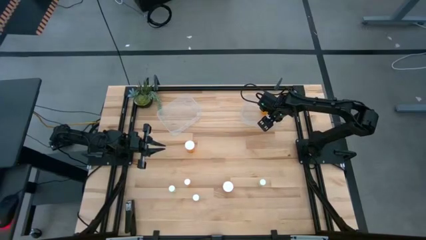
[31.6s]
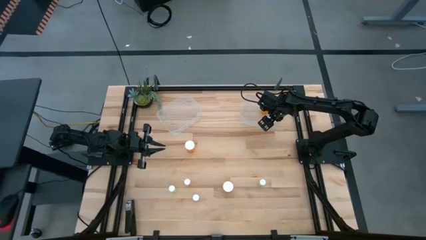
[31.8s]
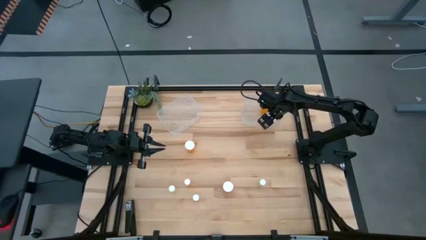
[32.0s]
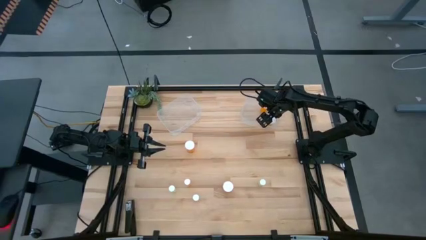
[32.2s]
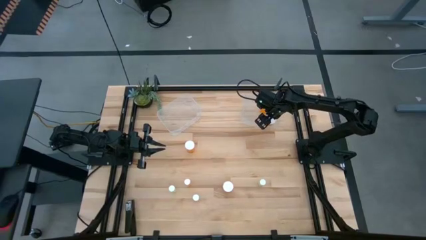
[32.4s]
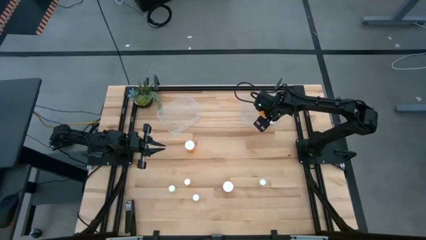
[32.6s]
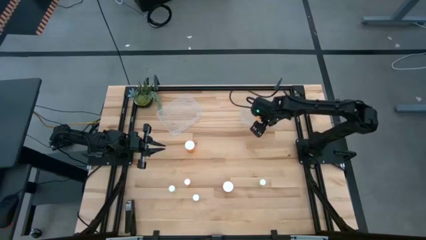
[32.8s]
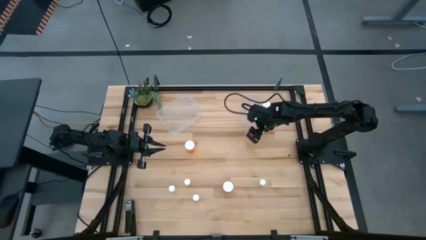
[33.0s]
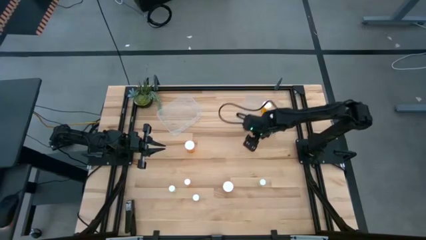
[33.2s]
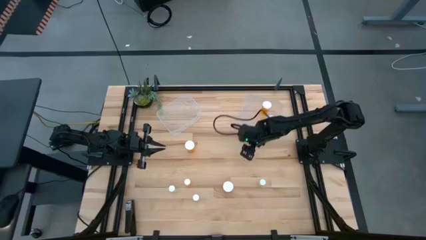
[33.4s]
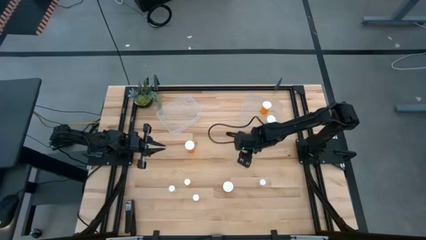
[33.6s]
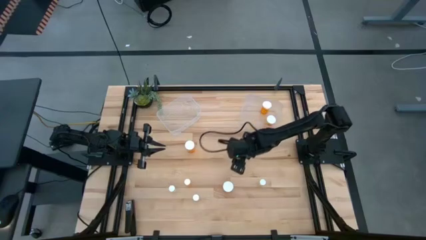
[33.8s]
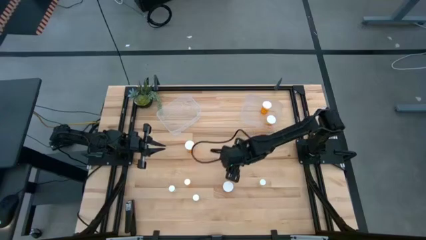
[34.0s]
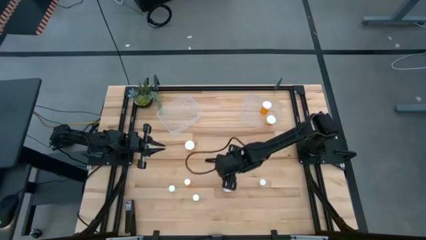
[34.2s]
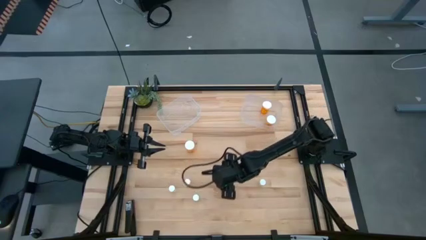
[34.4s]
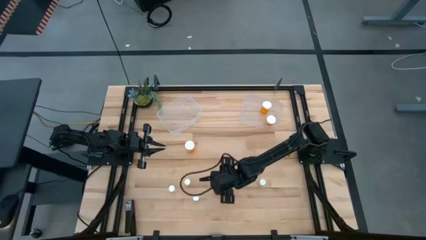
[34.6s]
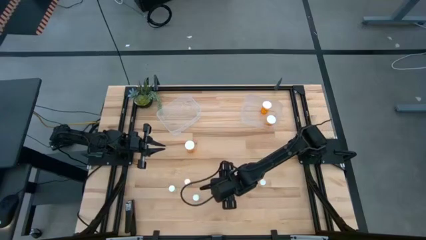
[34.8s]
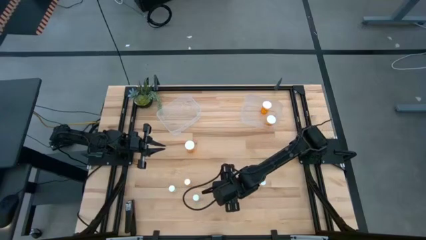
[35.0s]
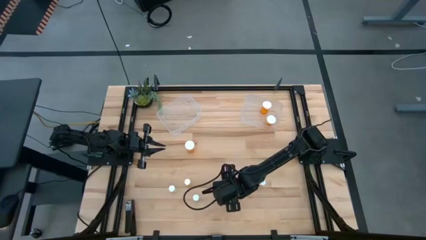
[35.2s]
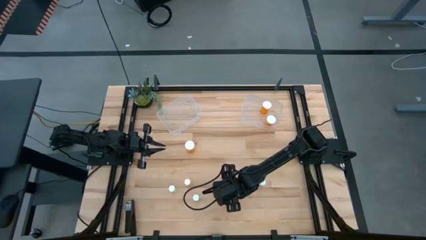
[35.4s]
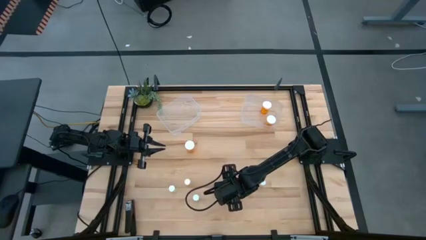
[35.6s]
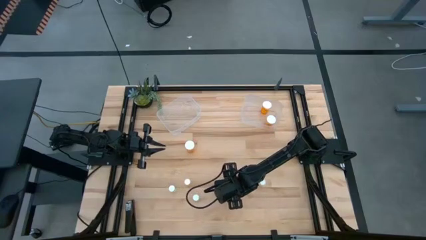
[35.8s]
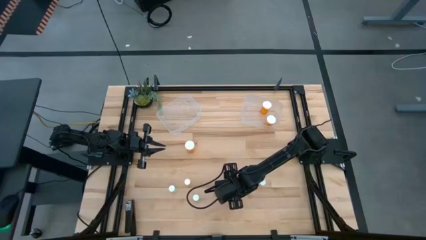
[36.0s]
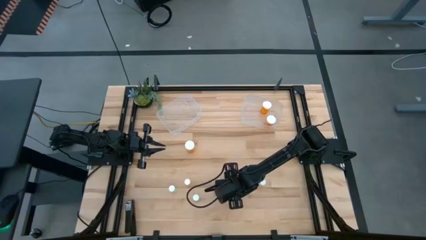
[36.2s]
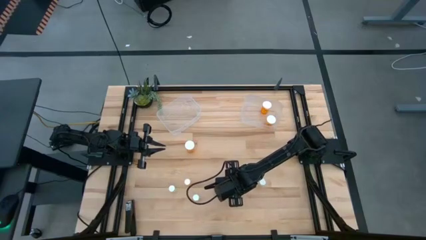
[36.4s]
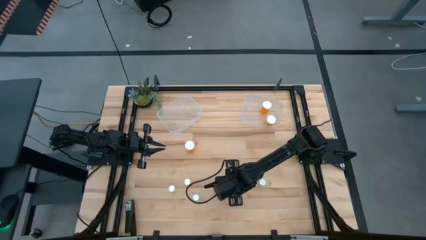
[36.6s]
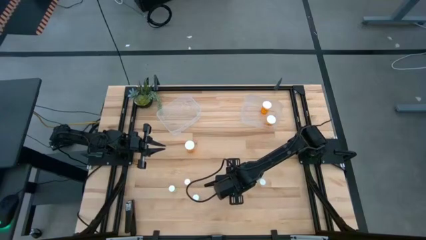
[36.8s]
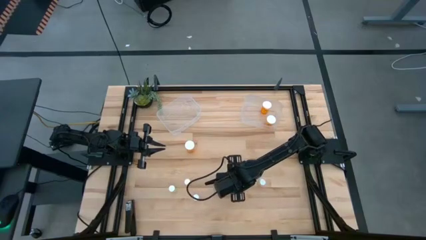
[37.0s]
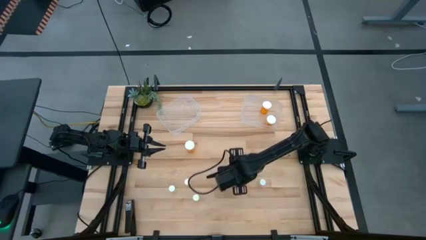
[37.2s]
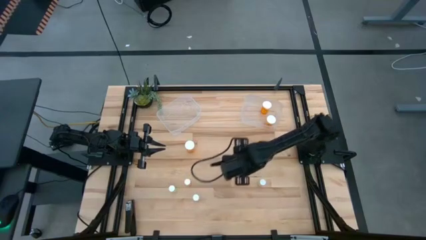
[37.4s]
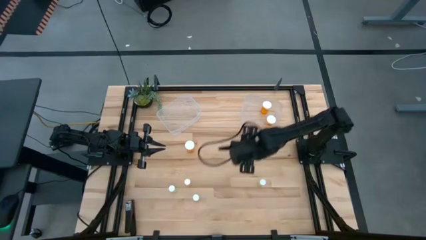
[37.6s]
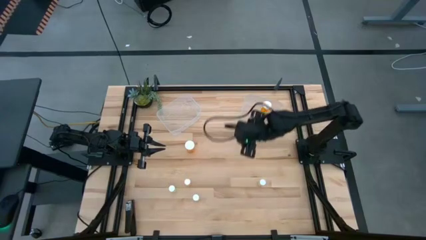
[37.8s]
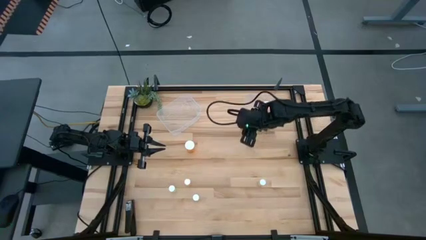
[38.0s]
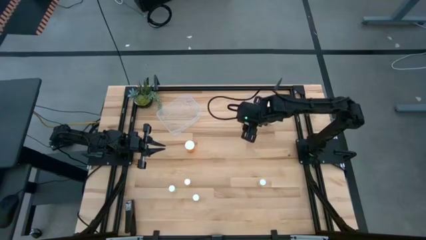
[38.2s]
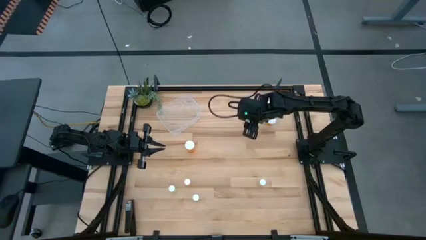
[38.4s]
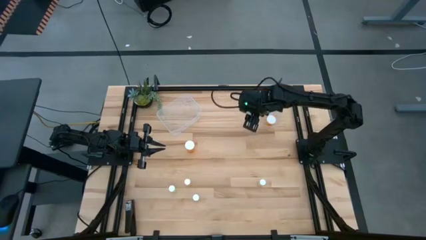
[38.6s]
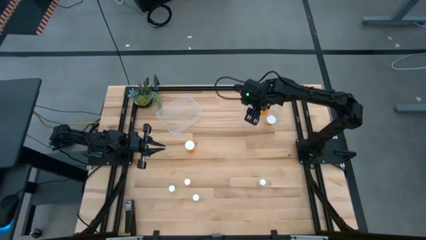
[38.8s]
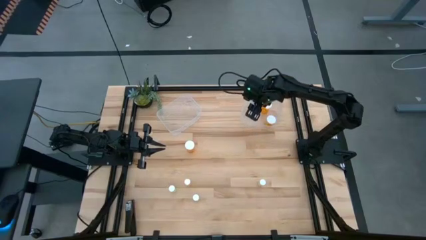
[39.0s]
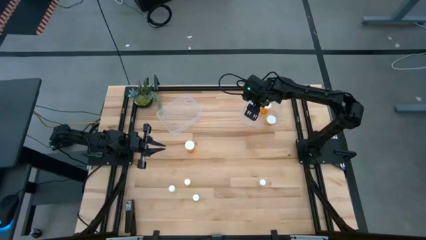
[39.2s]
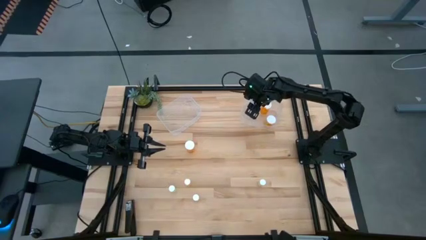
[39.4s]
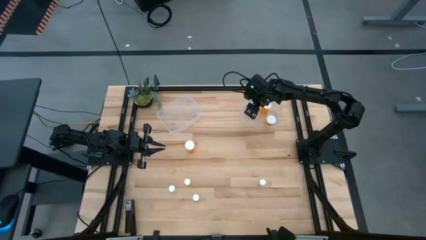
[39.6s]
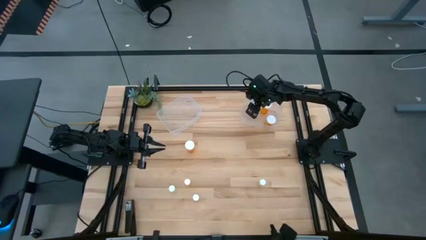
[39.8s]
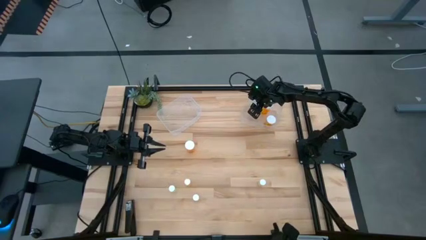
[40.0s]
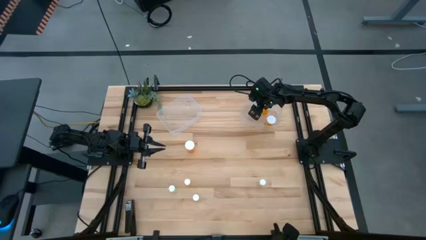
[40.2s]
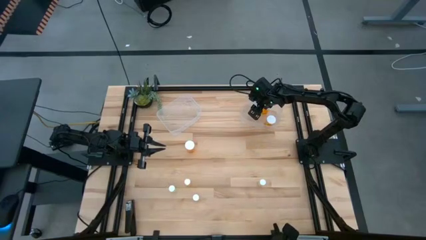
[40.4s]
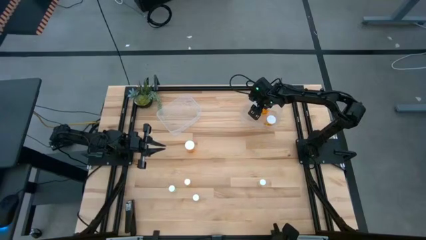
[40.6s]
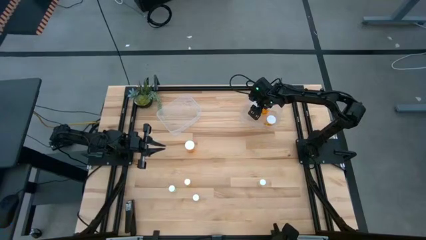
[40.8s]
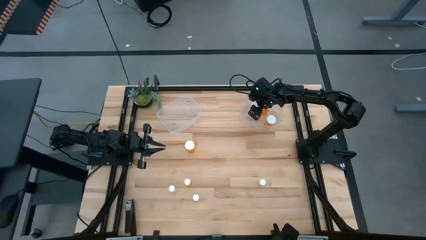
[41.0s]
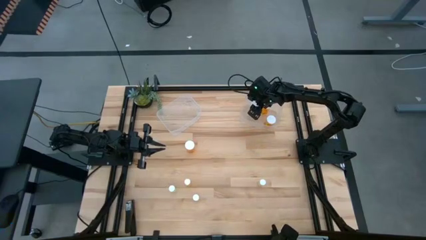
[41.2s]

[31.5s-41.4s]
Task: Pick and place medicine bottles into bin by pill shape (circle, oval)
Put the big orange pill bottle into the right transparent bin

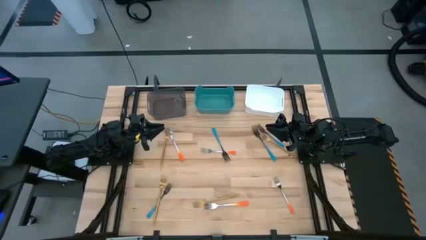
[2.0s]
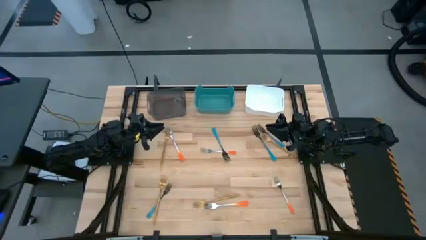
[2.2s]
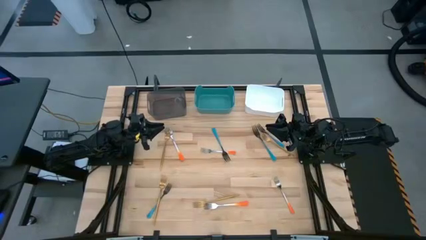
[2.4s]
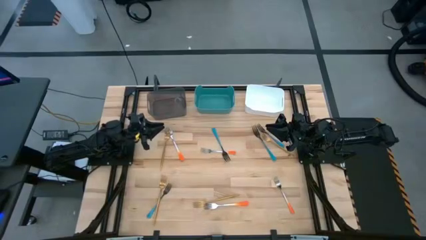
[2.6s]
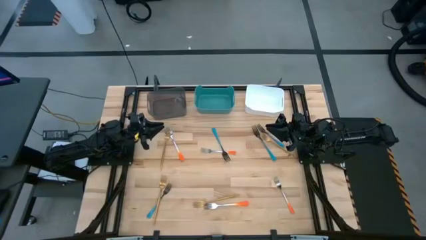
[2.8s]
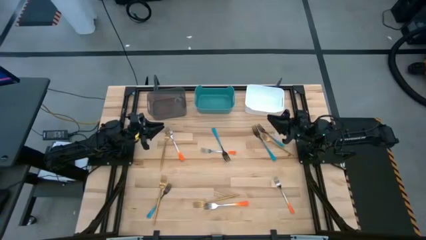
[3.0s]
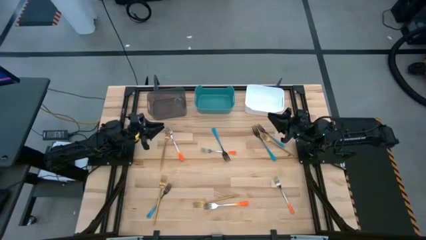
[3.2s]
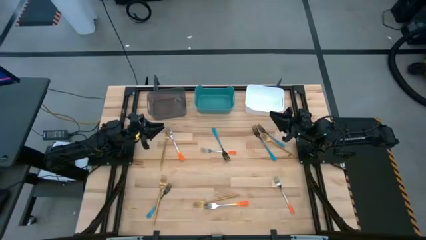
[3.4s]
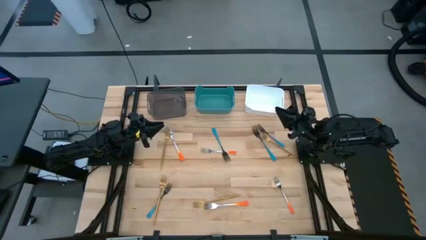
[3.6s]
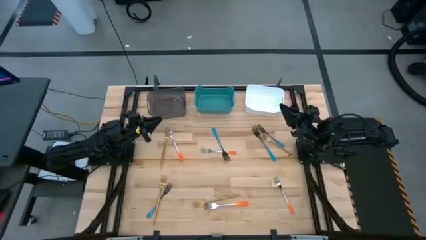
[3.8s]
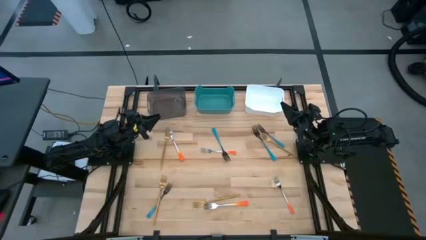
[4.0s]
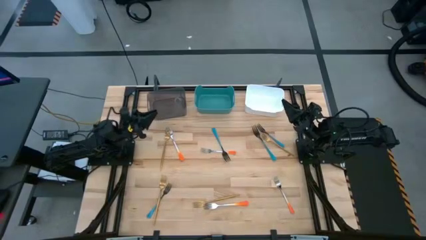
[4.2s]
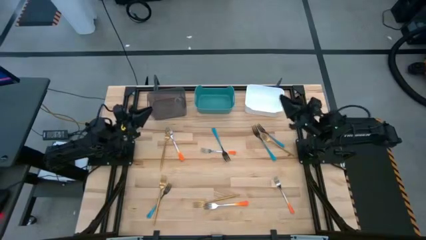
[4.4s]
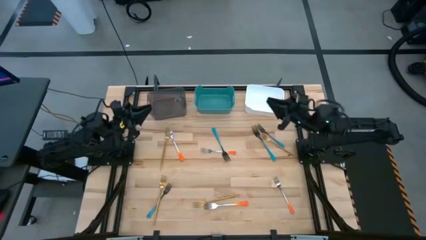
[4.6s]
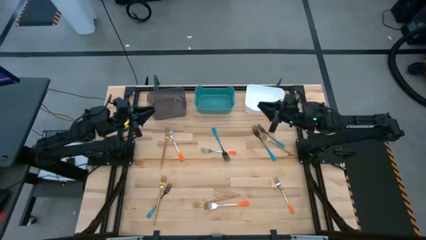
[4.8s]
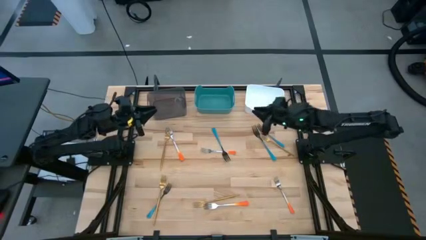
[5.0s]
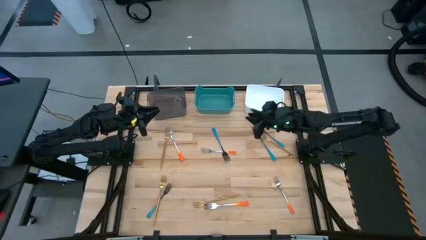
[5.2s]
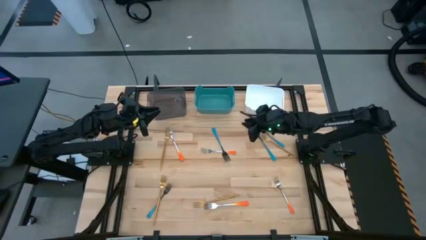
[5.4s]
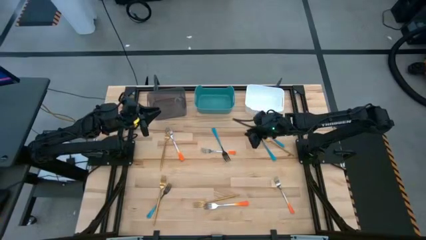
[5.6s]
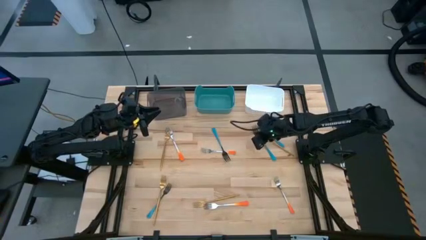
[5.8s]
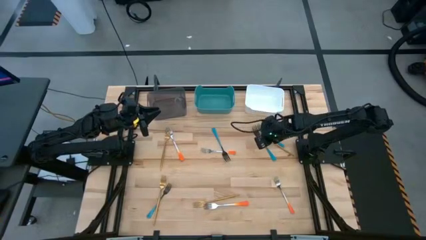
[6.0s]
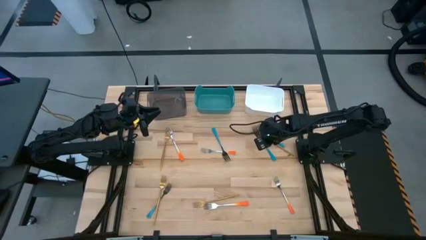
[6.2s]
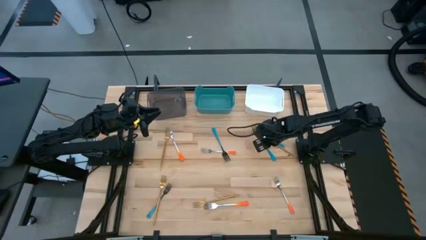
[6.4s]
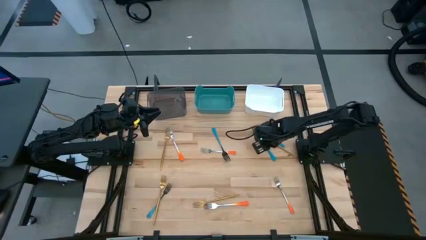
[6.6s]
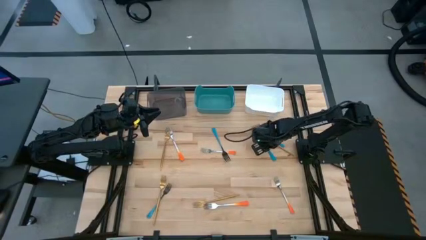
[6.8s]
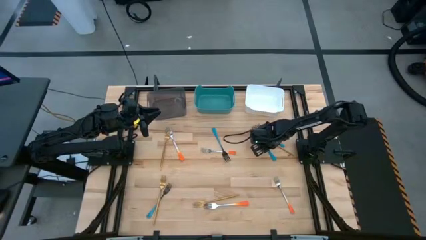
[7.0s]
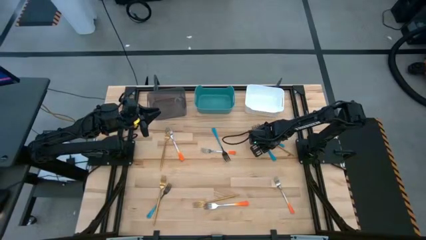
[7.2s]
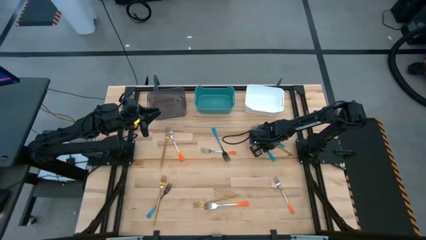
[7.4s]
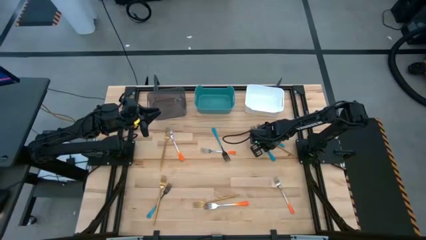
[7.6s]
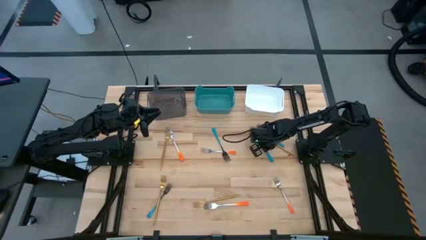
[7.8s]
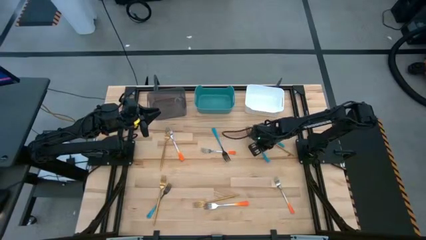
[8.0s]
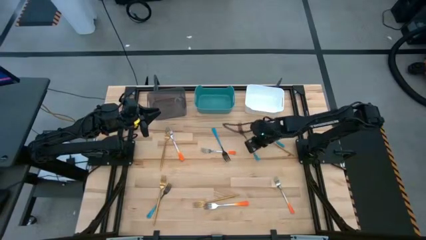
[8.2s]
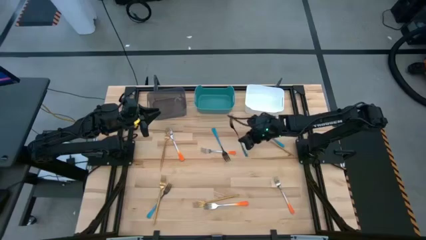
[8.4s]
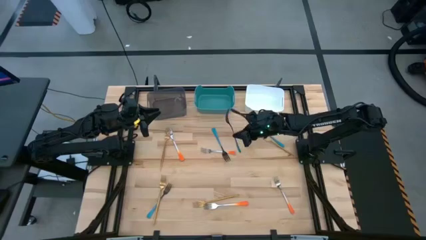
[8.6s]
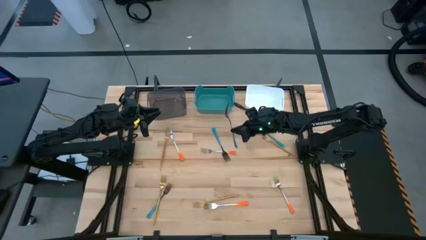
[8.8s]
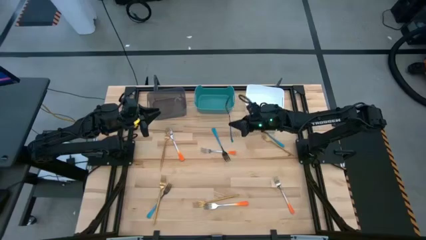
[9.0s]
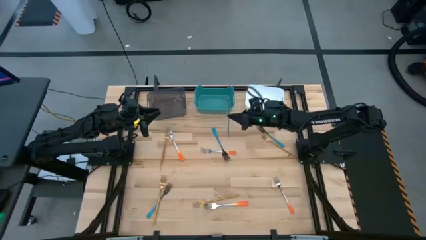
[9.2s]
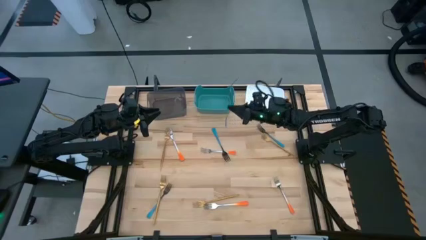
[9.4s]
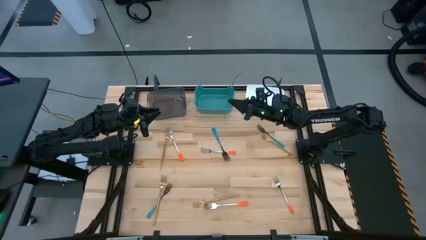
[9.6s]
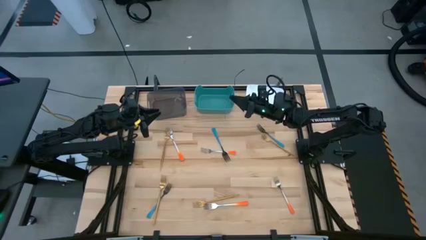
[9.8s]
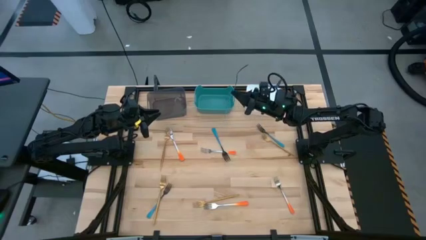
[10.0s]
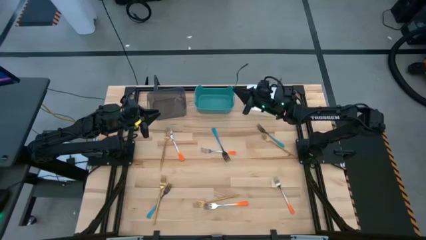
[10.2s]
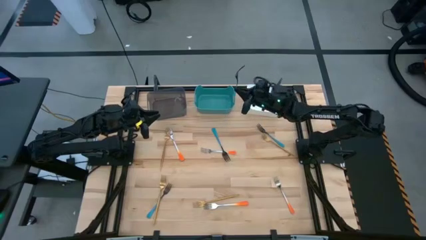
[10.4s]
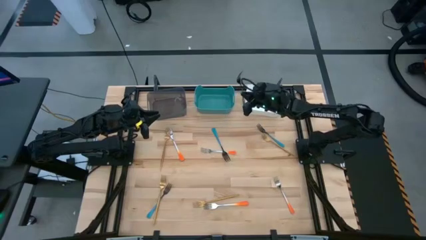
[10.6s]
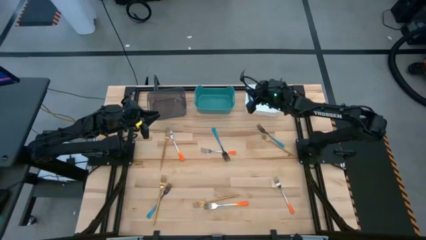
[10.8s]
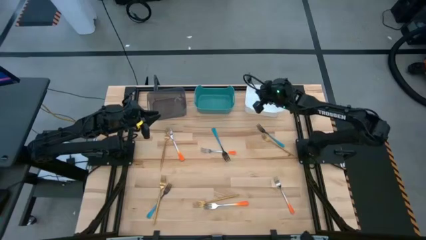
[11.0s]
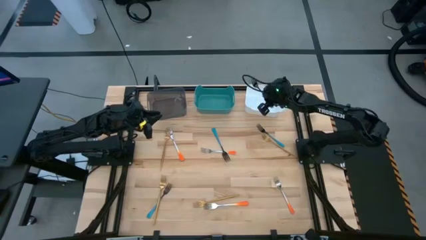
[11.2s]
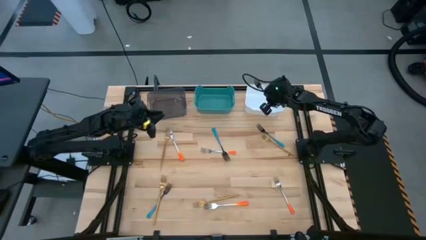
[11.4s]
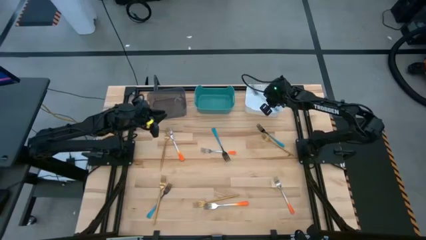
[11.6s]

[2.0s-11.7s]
Task: Sort silverware by color (type)
Put the blue fork into the white bin
